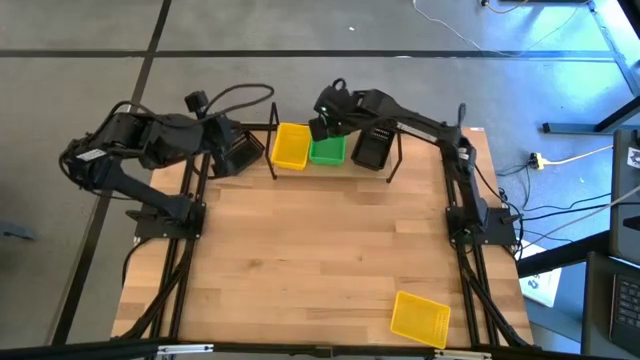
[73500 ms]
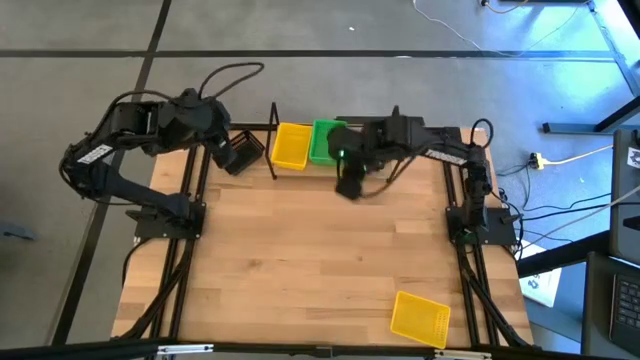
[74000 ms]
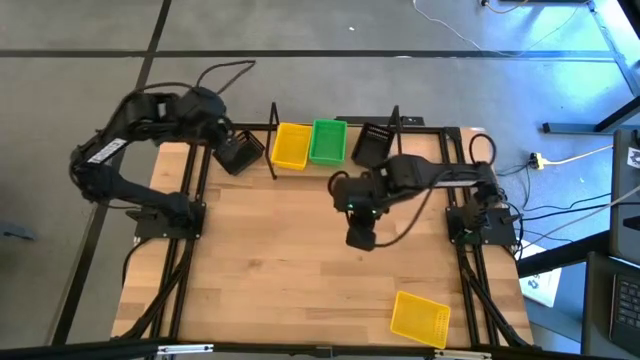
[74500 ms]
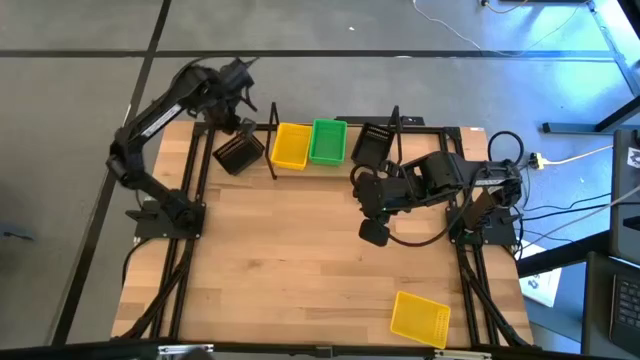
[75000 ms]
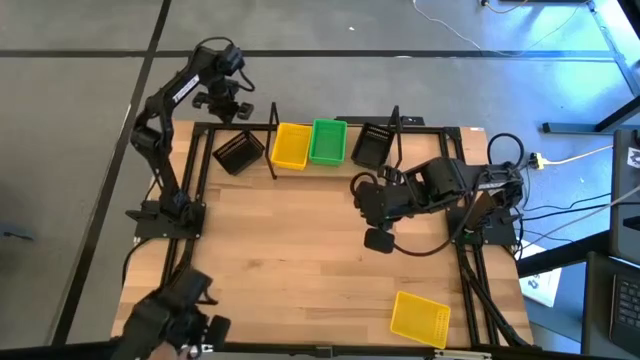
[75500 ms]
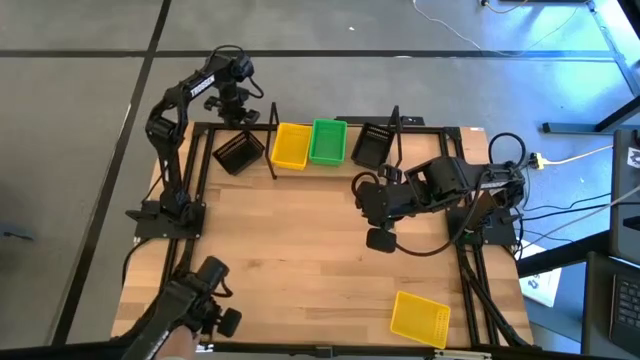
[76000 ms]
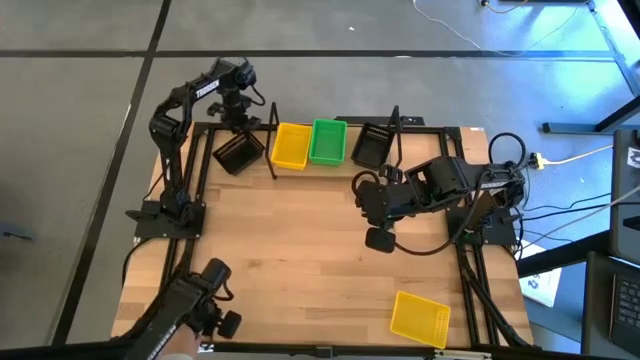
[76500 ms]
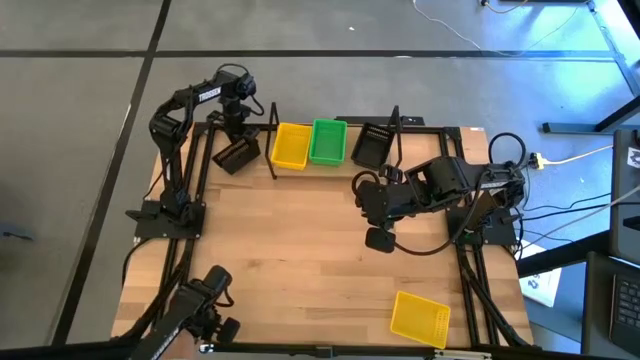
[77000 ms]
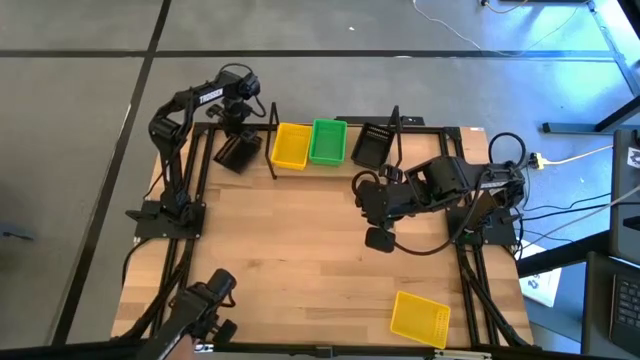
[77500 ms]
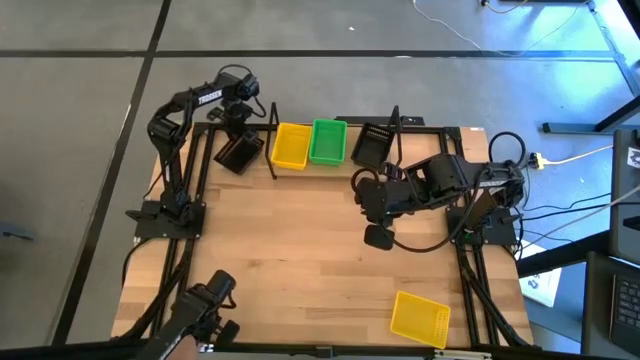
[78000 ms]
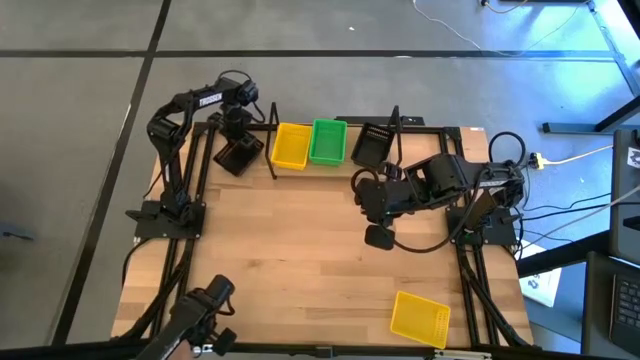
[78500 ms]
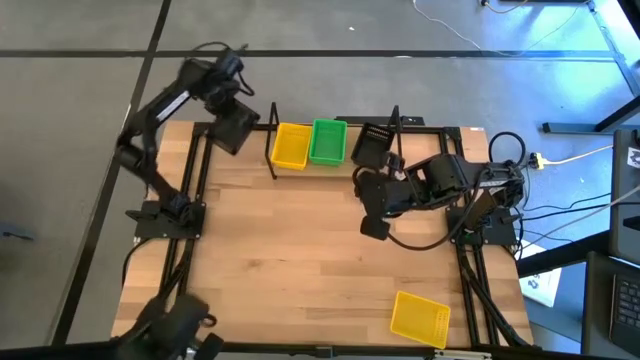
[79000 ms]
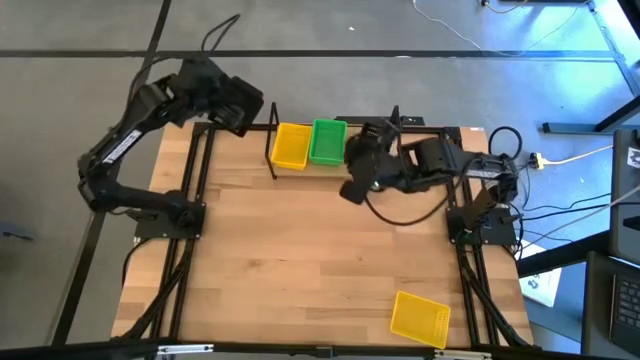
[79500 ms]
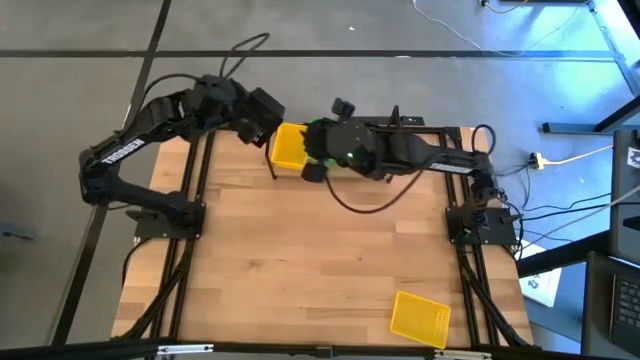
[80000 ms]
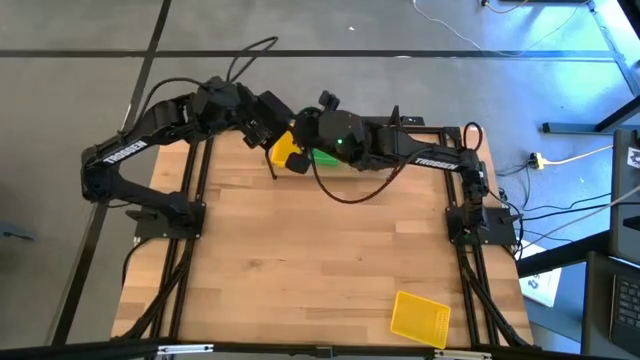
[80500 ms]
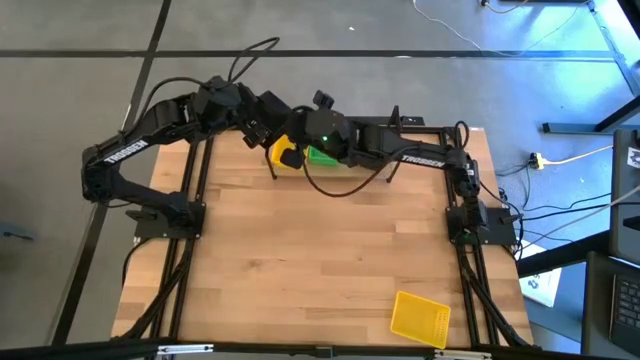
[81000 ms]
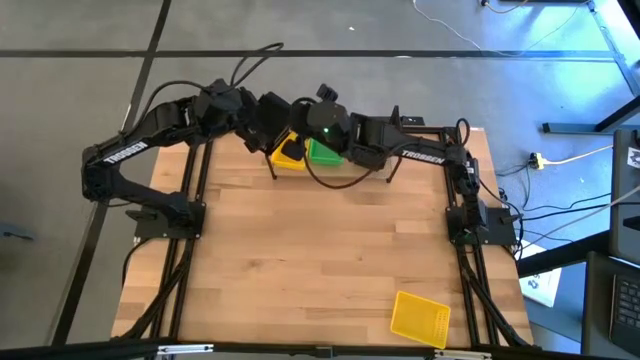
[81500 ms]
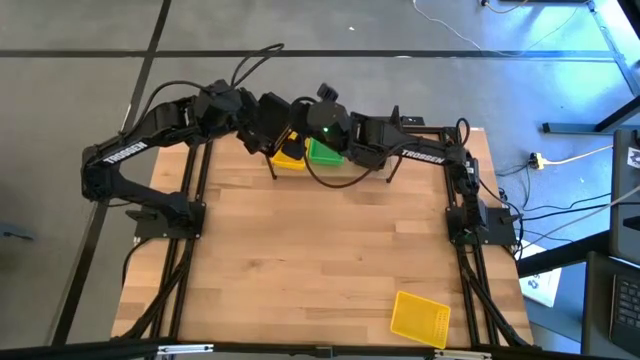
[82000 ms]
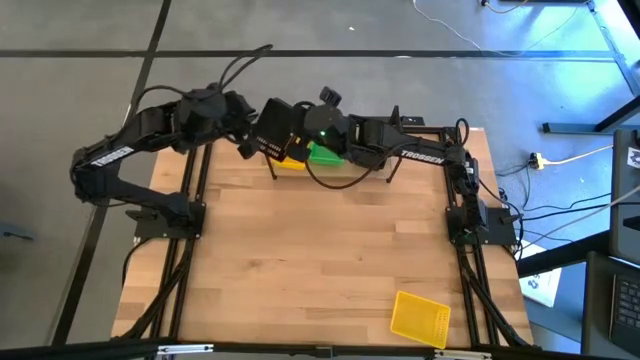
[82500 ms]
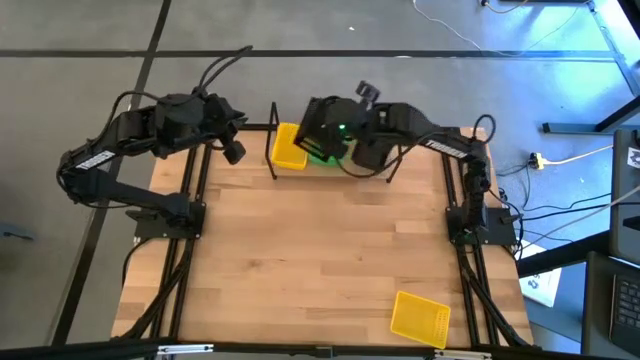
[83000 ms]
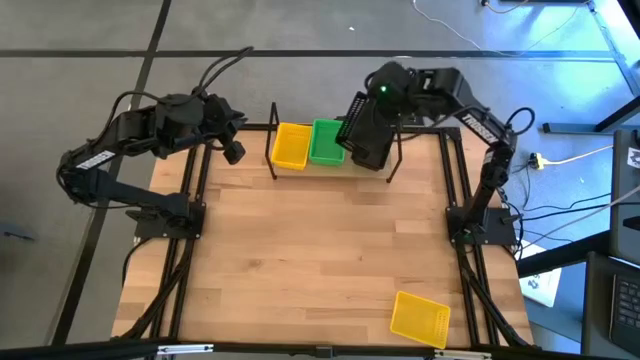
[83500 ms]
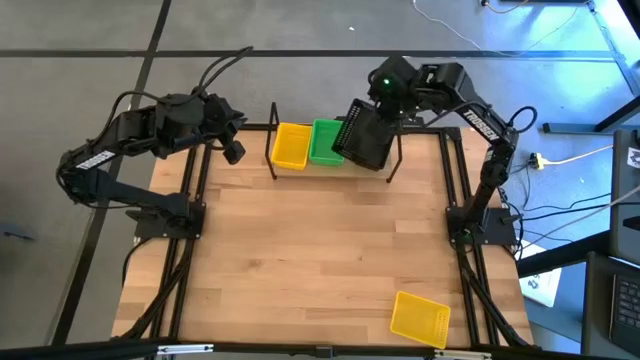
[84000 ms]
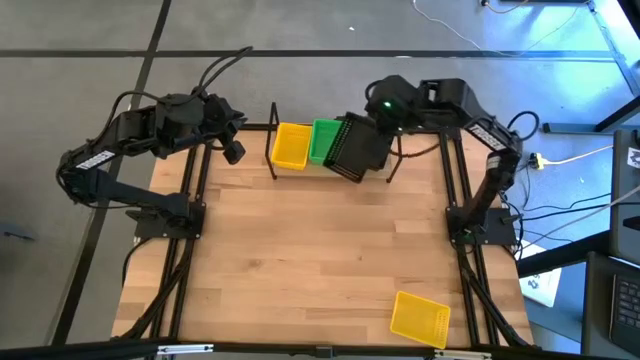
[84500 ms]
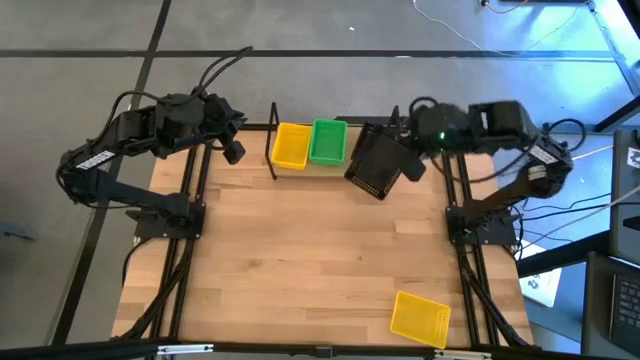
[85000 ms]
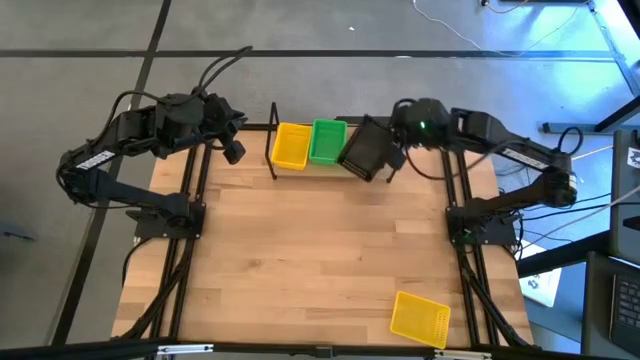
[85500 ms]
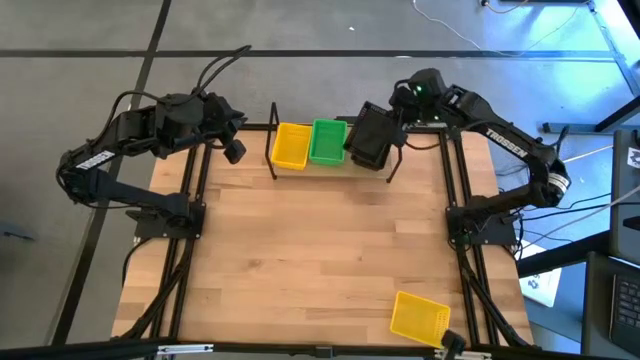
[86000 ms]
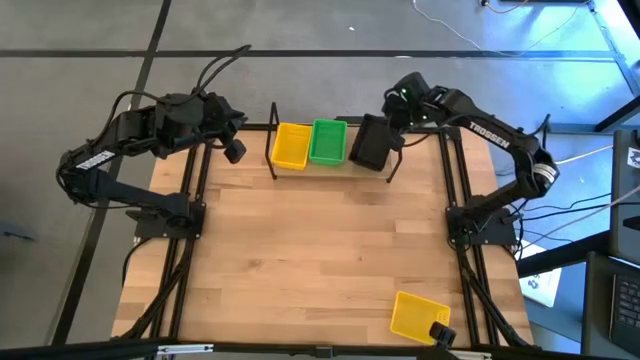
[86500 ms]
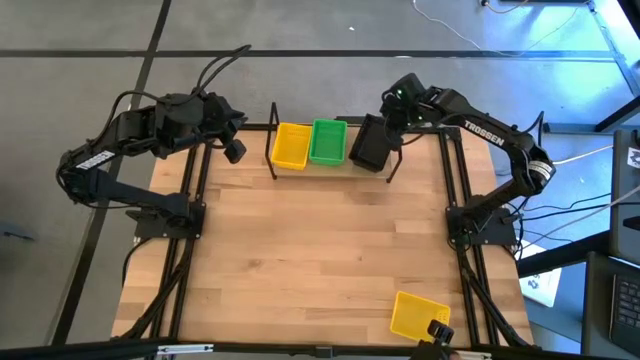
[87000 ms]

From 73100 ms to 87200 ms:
Task: Stack baskets on shelf by color
Stack the black bin on top of the black bin on the shelf

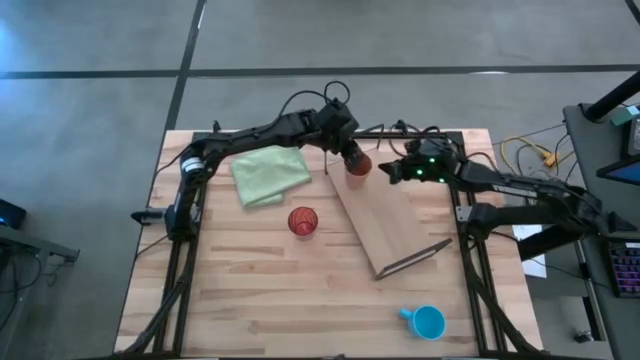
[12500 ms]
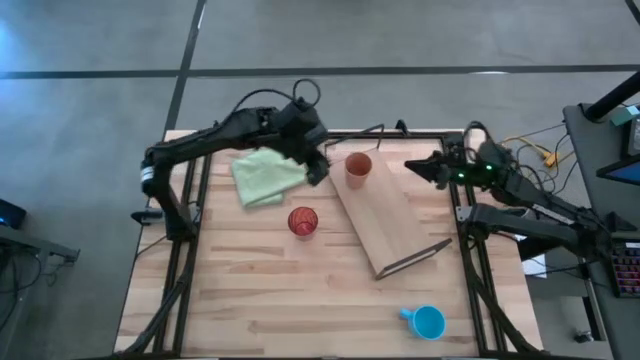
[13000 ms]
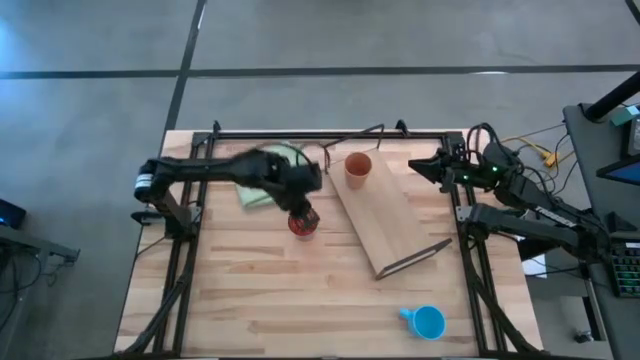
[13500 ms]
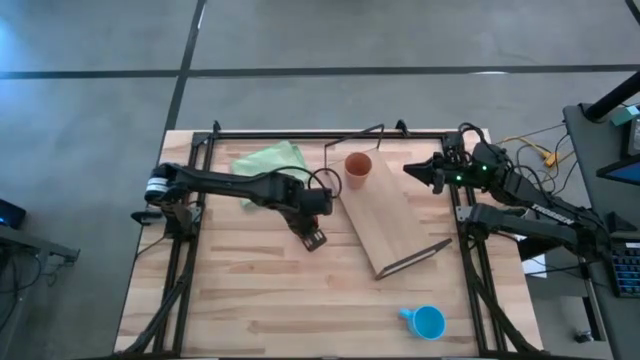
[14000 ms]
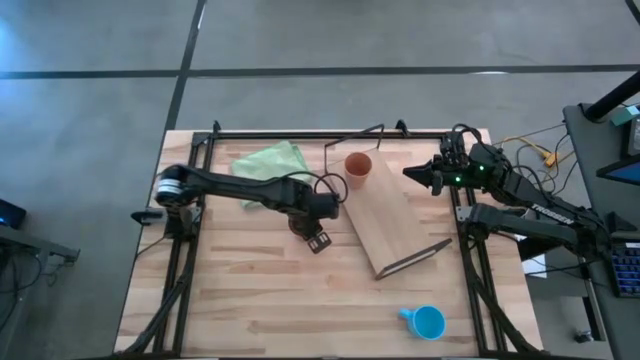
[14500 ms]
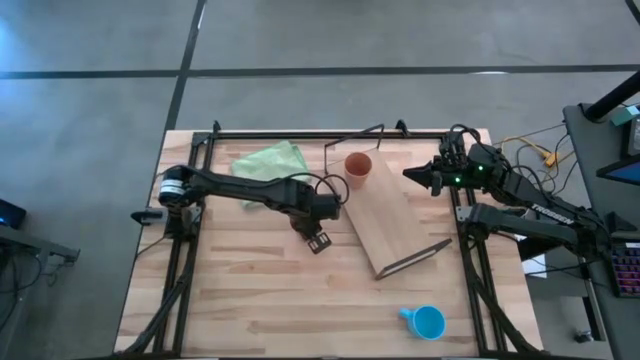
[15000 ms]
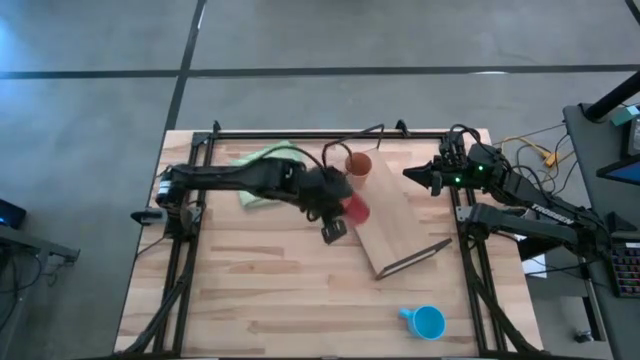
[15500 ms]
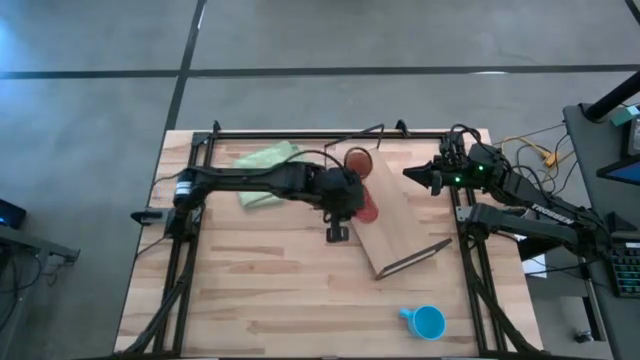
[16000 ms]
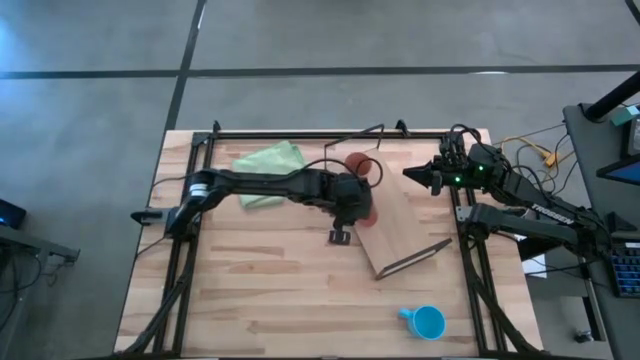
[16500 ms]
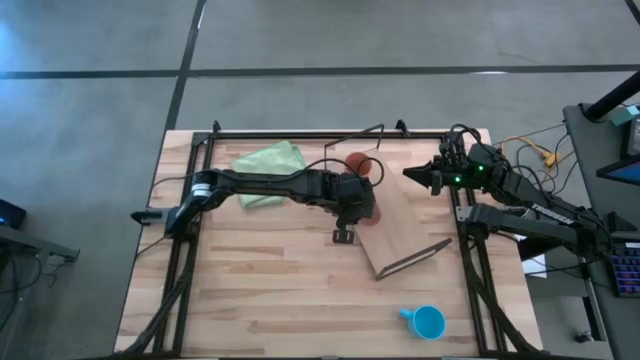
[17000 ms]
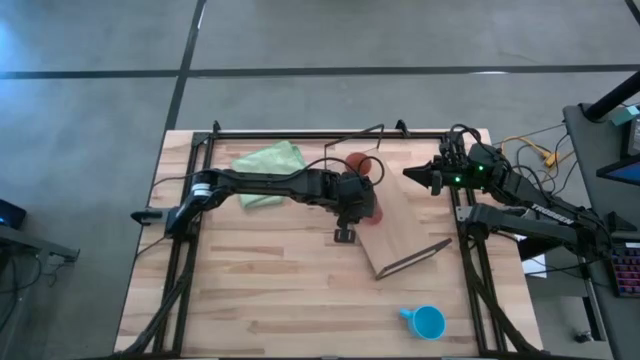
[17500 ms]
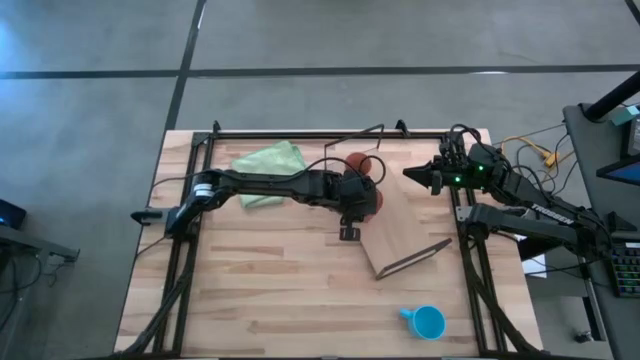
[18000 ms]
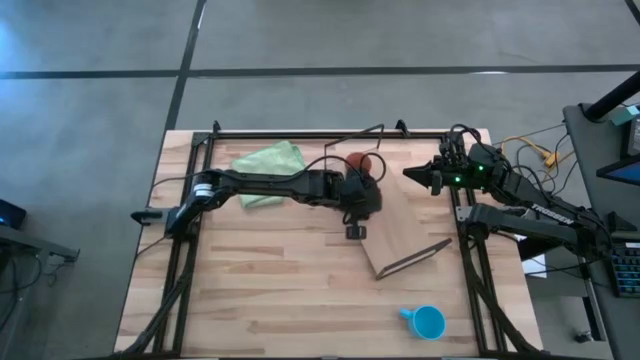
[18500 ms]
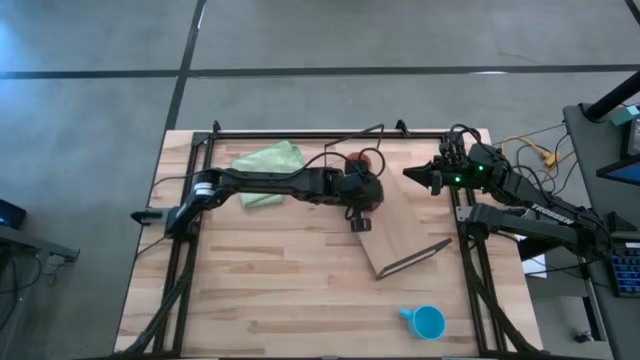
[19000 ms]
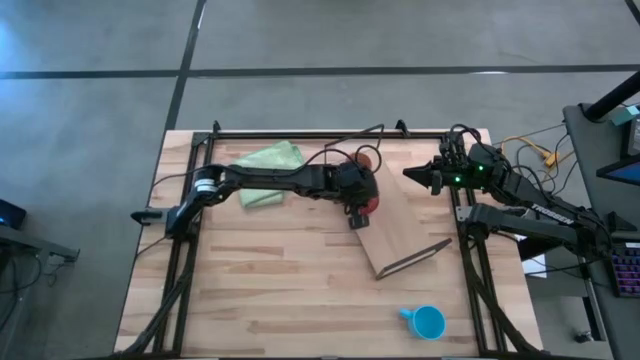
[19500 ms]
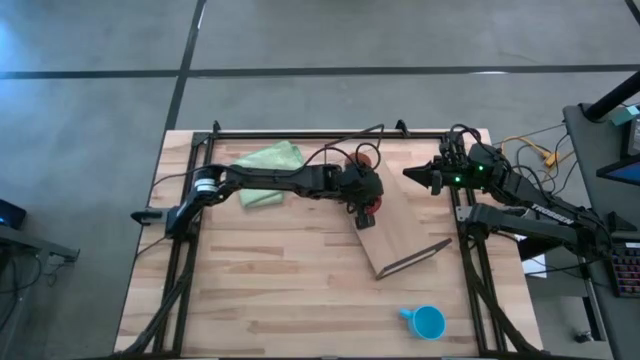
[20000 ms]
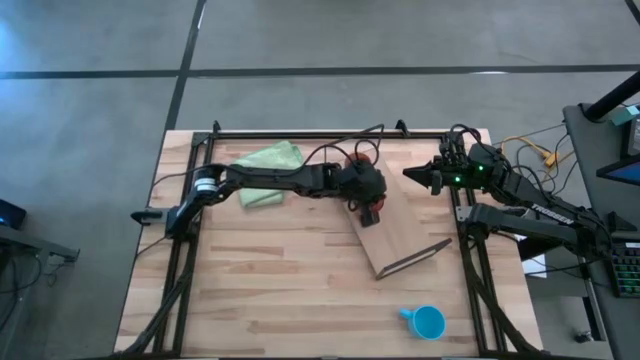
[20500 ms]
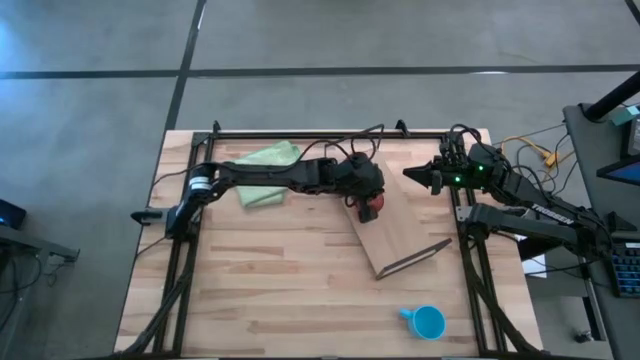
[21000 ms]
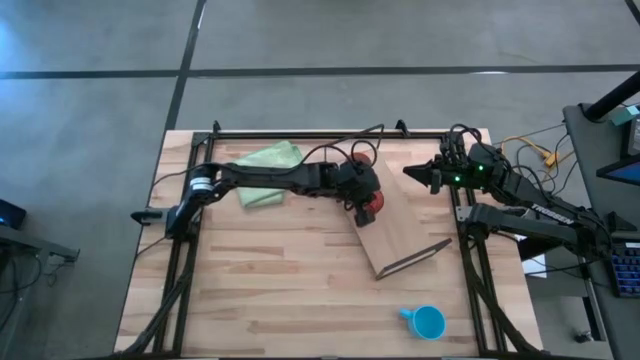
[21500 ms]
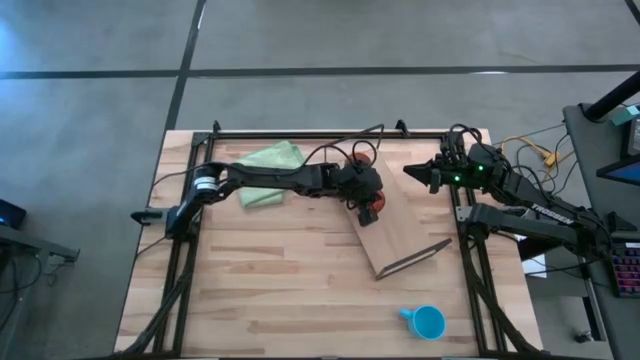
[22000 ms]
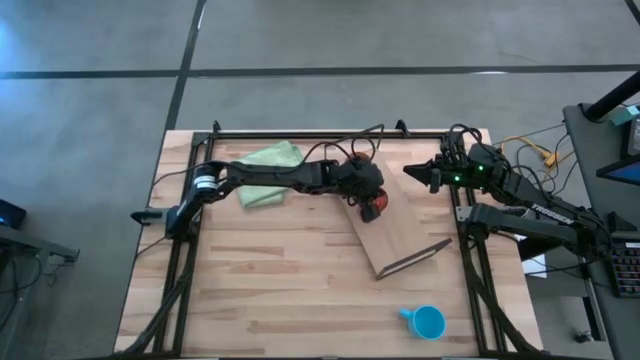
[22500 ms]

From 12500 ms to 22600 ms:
Task: Stack small to large cups/mugs on shelf
Put the orange glass on the shelf
